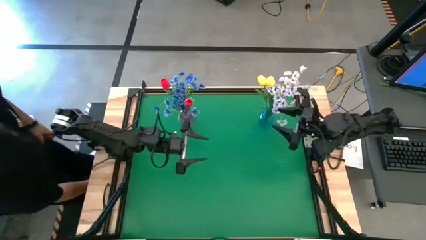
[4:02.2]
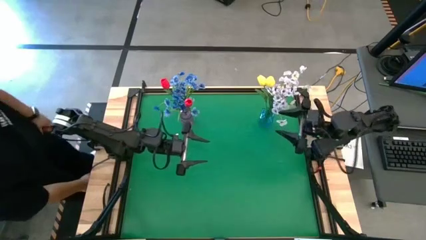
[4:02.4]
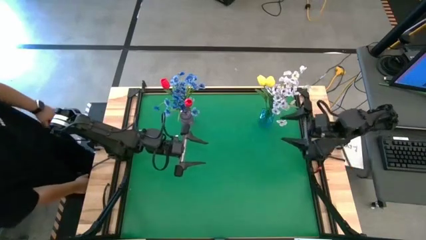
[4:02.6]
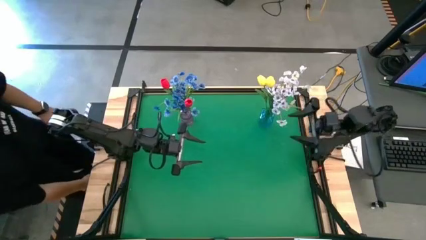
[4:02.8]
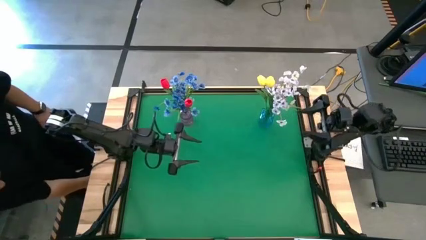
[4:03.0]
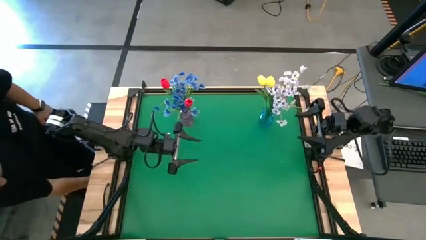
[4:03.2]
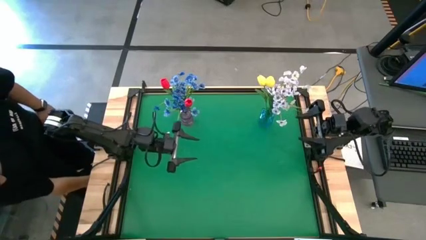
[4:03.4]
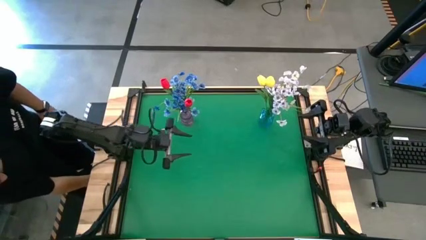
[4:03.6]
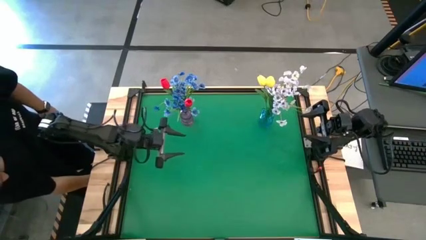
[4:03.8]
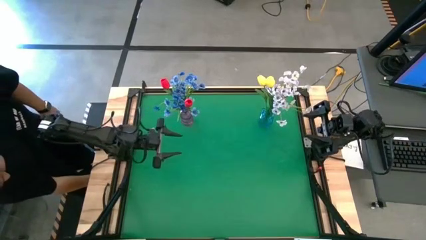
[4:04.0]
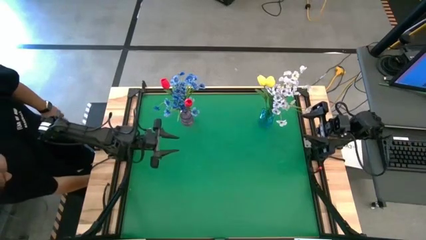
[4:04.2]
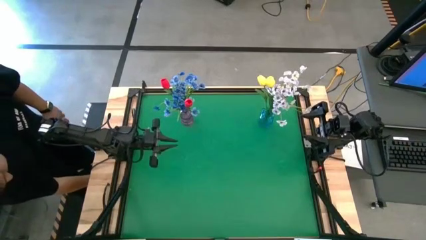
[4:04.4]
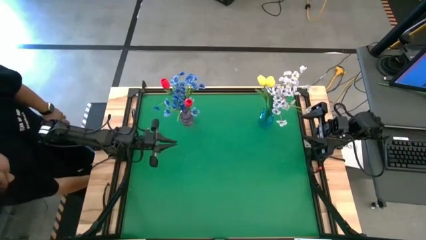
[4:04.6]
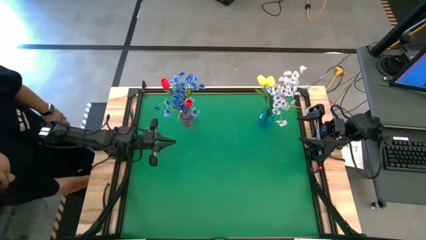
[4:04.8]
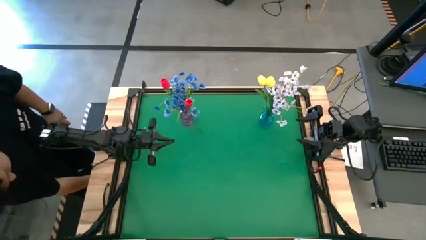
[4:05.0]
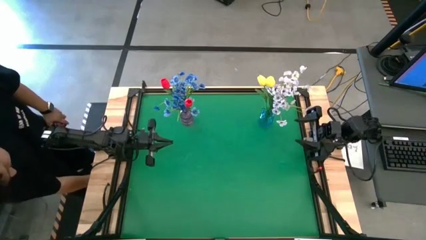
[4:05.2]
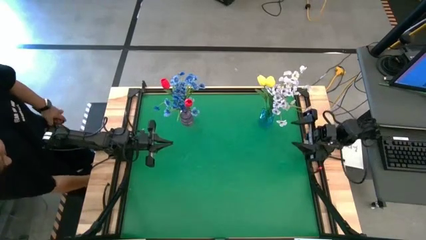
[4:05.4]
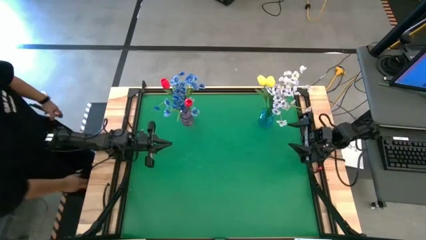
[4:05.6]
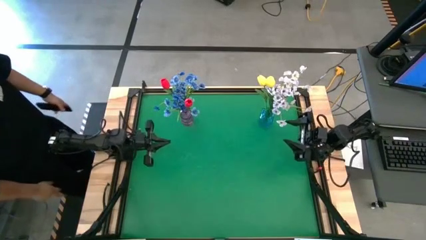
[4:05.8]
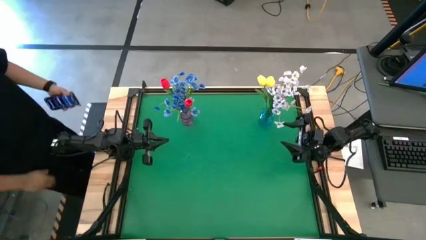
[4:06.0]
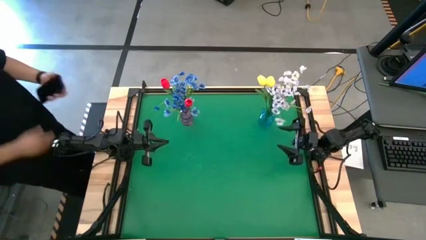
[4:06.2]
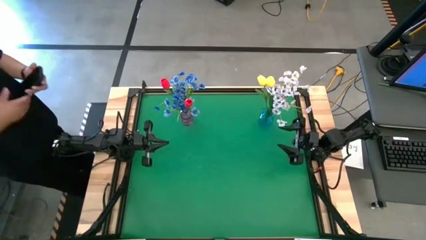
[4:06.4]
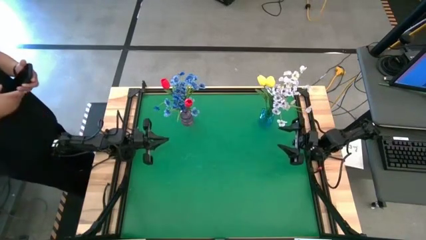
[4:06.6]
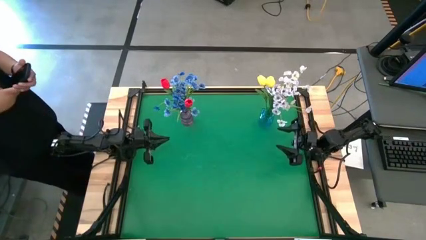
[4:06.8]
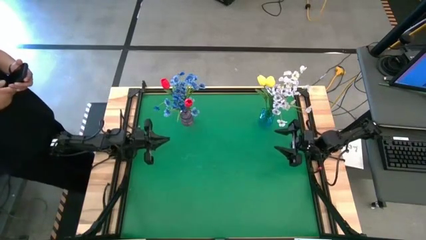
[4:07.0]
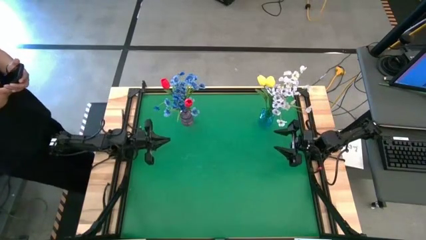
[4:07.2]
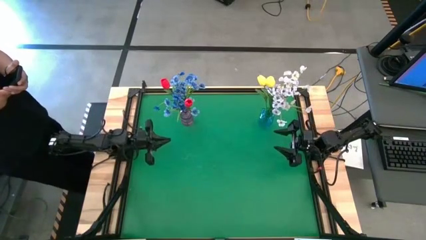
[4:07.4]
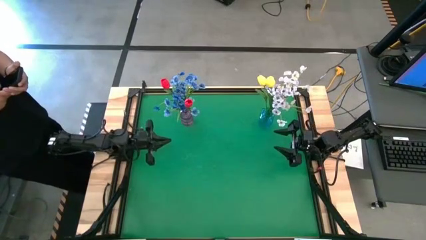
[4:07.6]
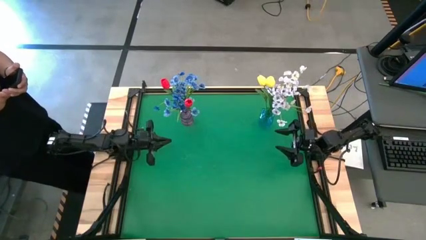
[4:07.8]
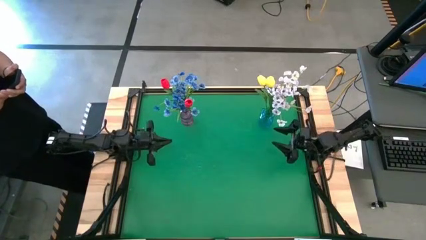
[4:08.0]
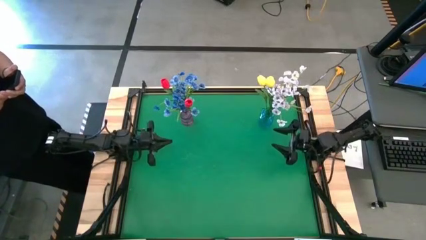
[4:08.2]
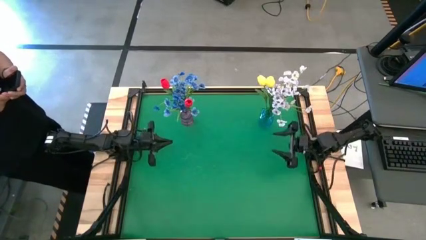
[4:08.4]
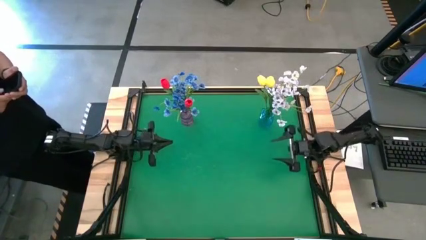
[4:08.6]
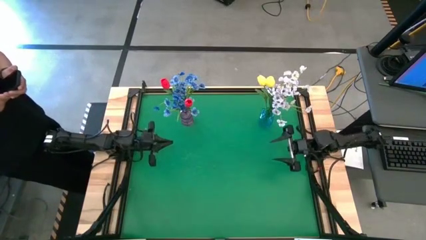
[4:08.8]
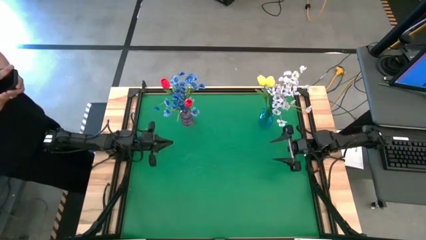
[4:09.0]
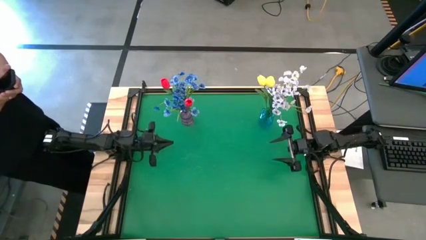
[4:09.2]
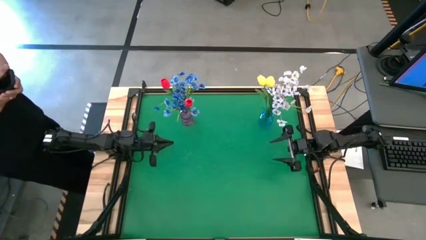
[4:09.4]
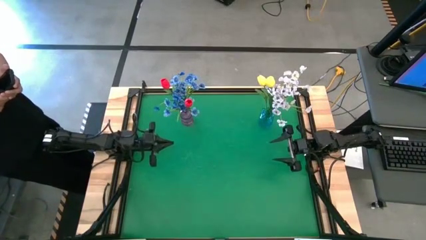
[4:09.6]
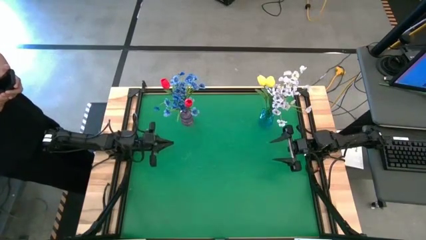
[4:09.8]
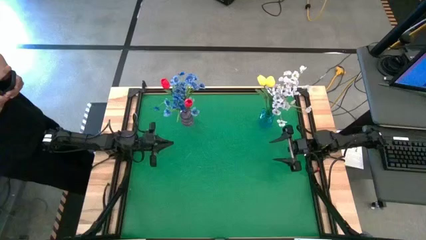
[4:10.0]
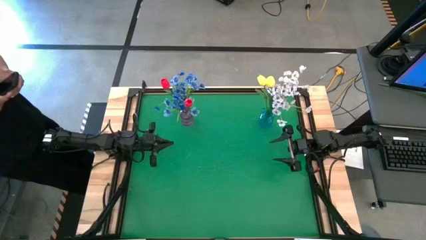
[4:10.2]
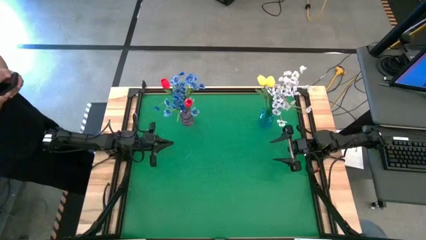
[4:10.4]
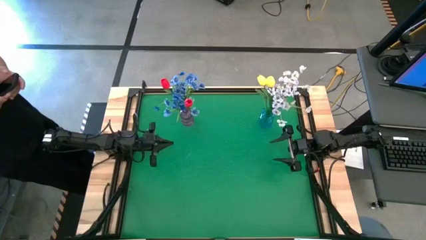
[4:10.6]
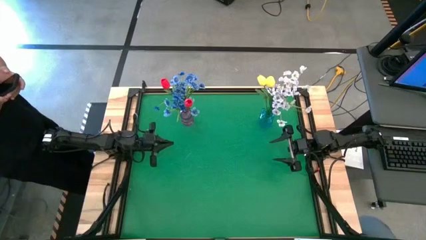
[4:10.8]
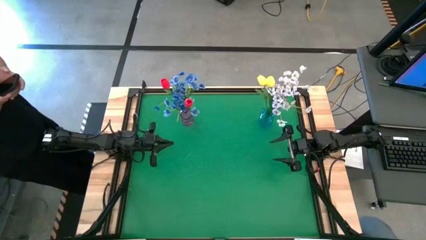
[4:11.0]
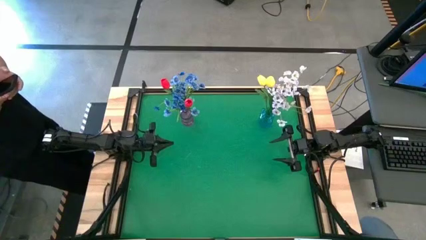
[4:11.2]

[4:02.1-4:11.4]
Task: Sort flowers into vase by color
Return to Home Position

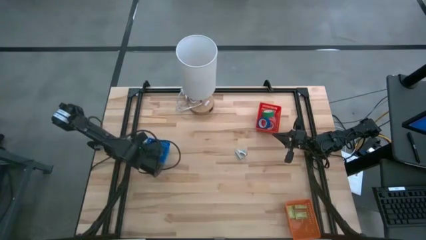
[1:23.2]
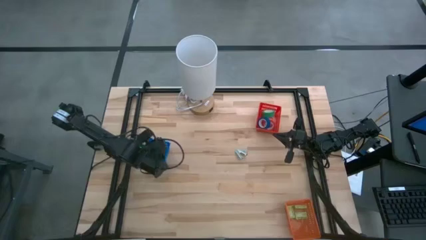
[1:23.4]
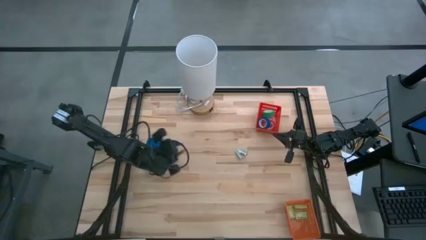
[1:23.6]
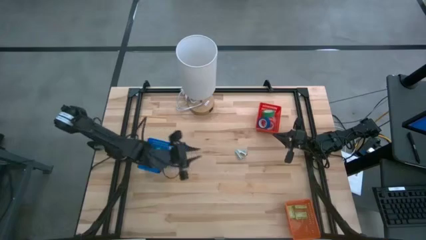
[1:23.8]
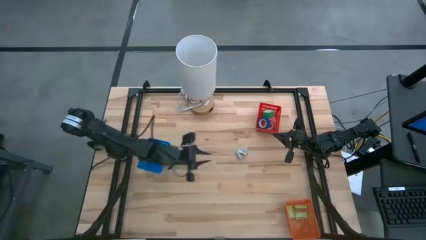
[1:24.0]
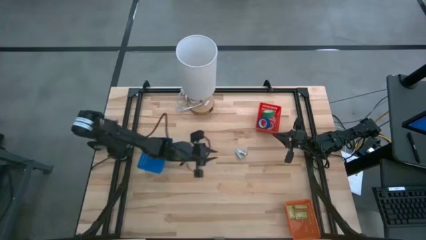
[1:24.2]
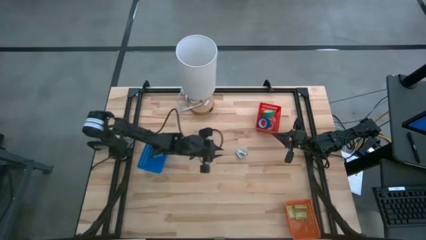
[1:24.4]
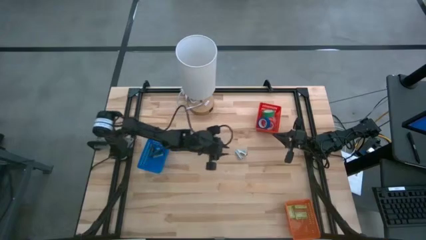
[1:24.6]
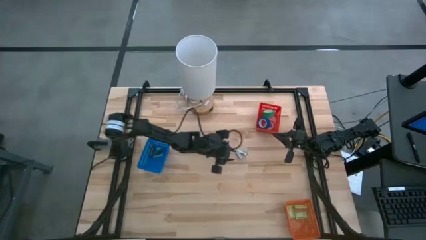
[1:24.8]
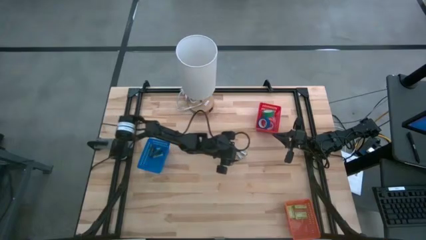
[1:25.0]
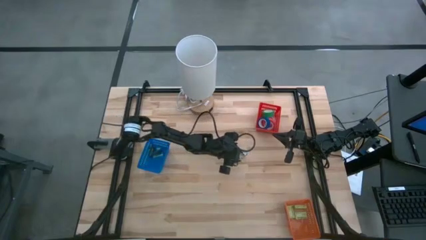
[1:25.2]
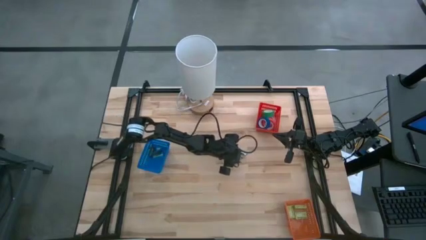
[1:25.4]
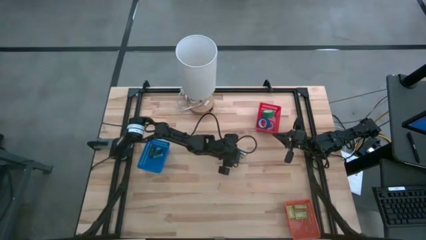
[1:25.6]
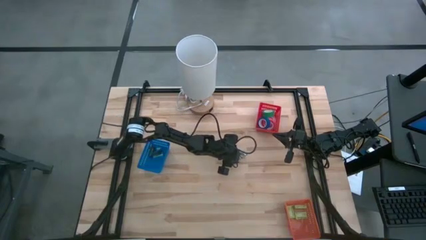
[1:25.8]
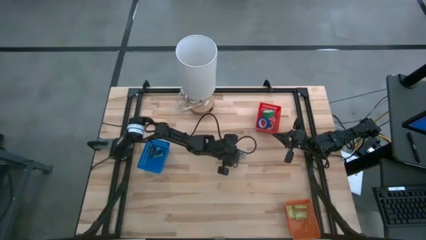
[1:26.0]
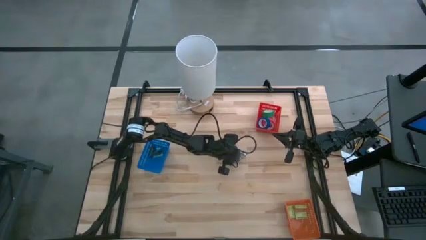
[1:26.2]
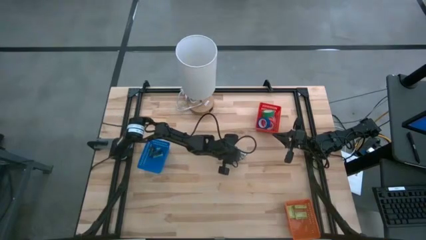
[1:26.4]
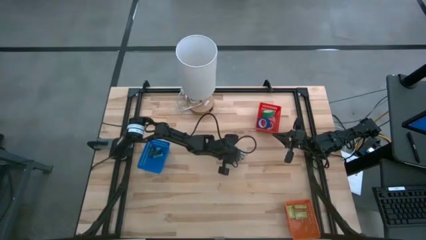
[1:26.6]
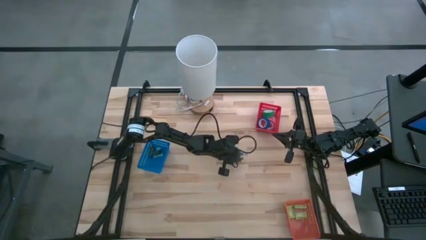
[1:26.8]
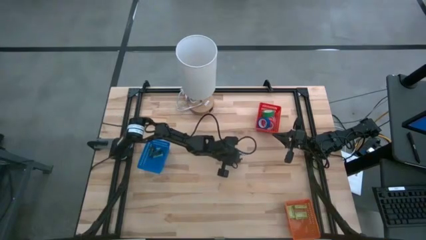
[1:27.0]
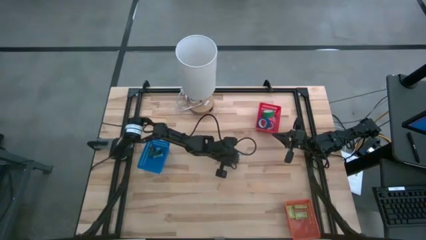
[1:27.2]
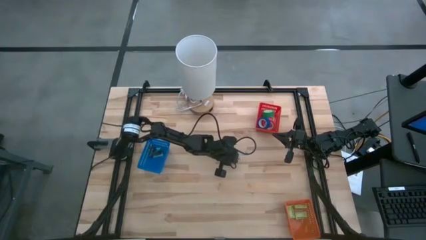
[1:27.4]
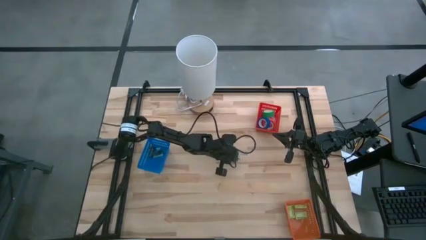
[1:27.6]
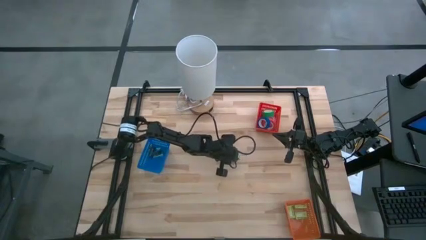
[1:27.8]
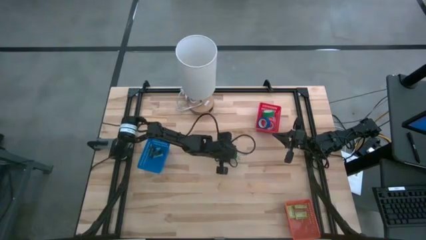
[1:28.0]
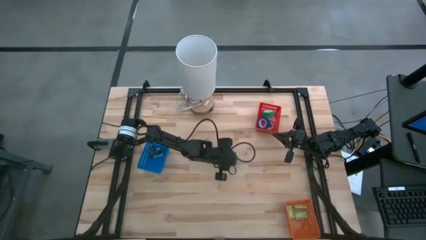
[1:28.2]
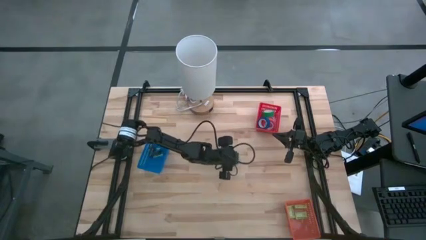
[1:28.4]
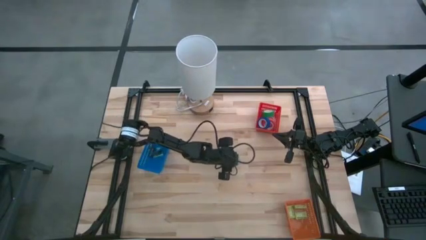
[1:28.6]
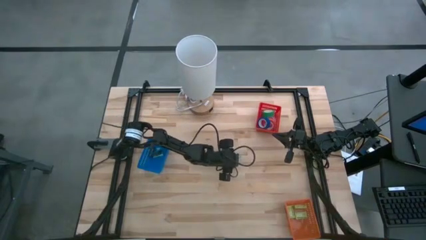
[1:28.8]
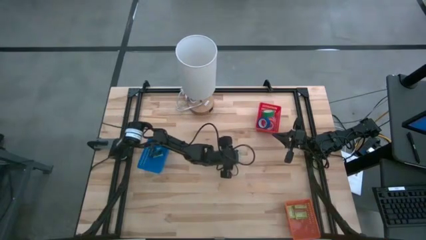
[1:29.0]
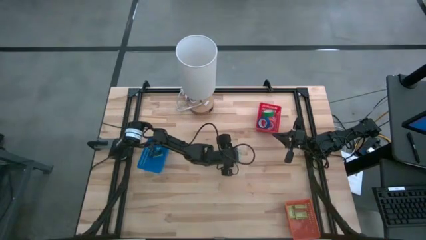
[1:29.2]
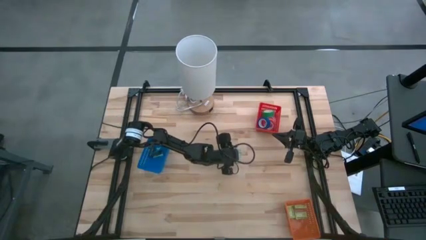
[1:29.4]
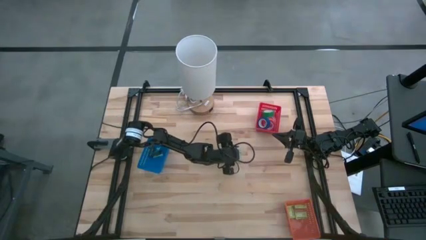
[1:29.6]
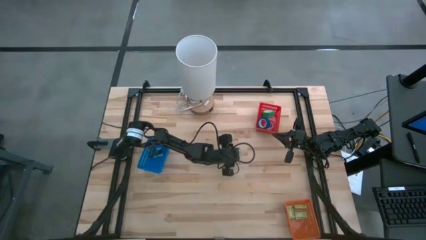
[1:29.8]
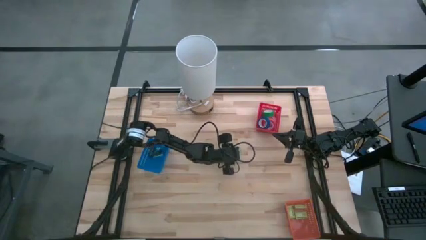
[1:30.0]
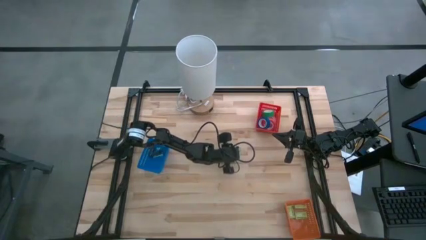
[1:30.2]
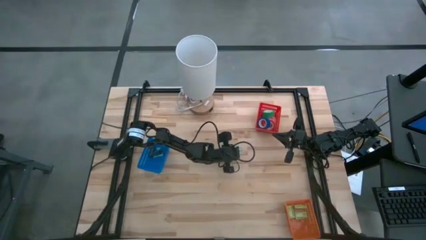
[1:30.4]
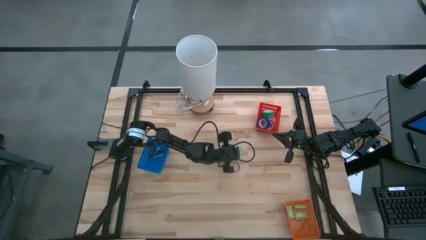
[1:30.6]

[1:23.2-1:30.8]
Task: Pick and place Stapler, Stapler remover, tape
Put the light blue staple remover into the blue bin
